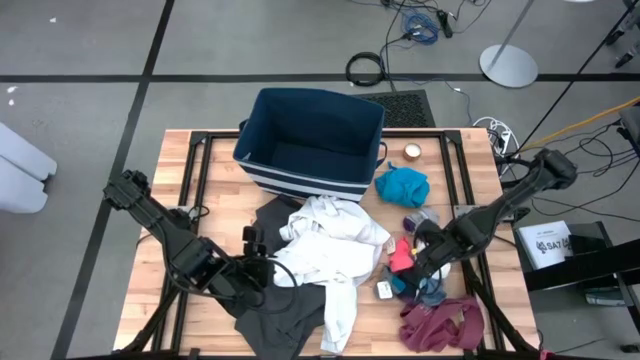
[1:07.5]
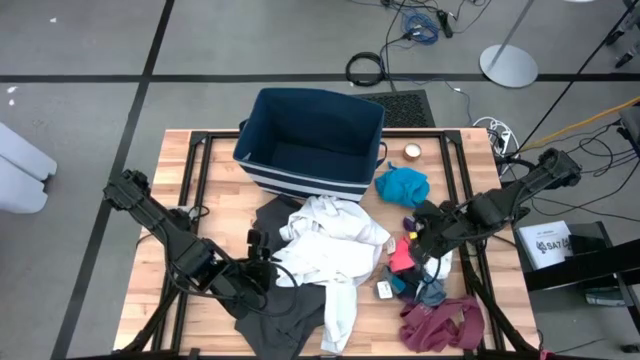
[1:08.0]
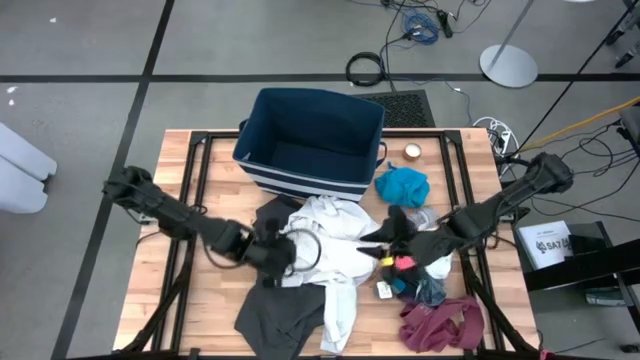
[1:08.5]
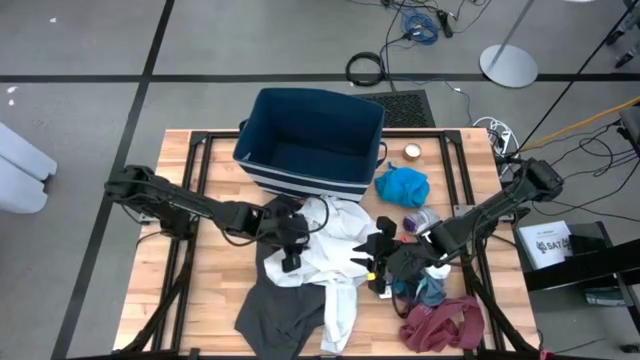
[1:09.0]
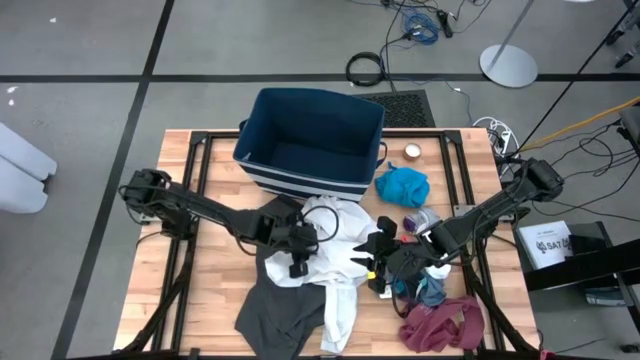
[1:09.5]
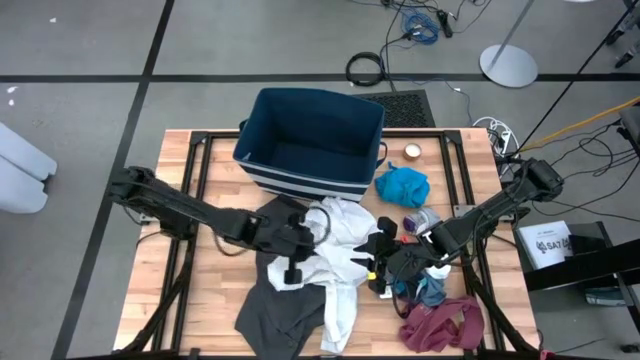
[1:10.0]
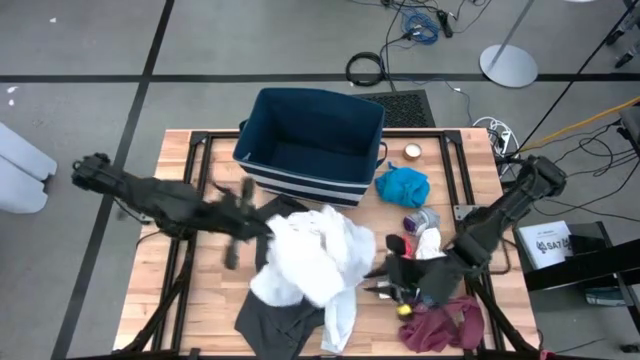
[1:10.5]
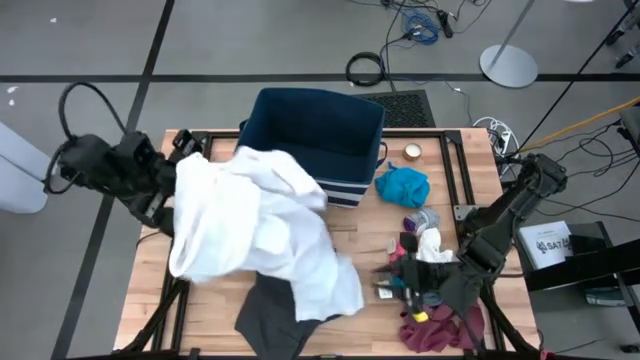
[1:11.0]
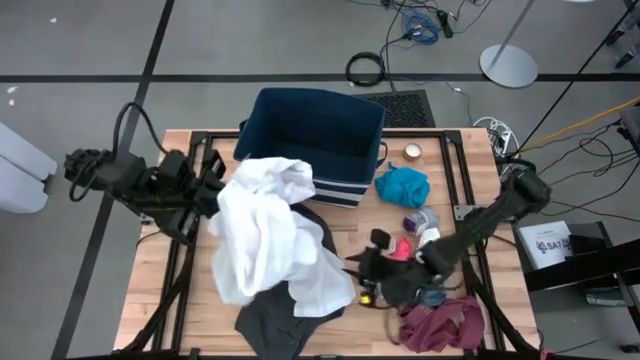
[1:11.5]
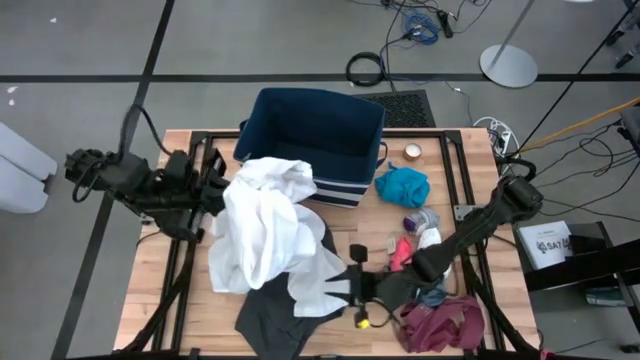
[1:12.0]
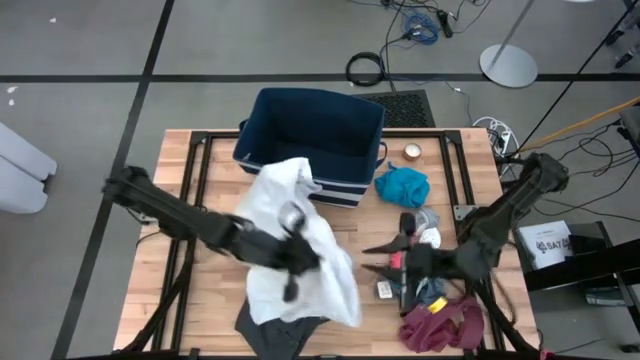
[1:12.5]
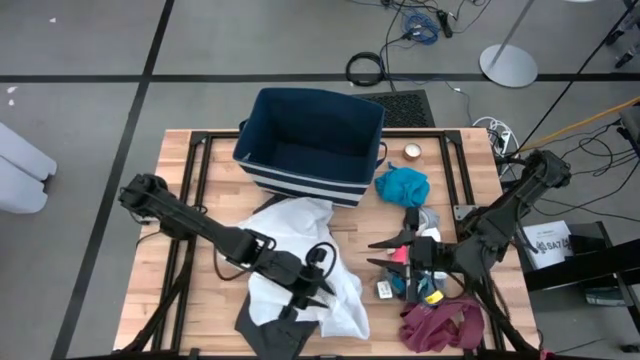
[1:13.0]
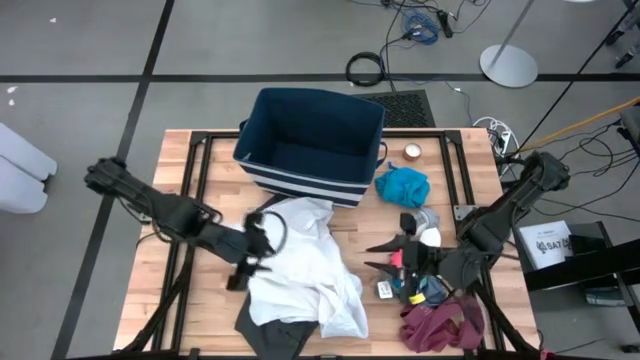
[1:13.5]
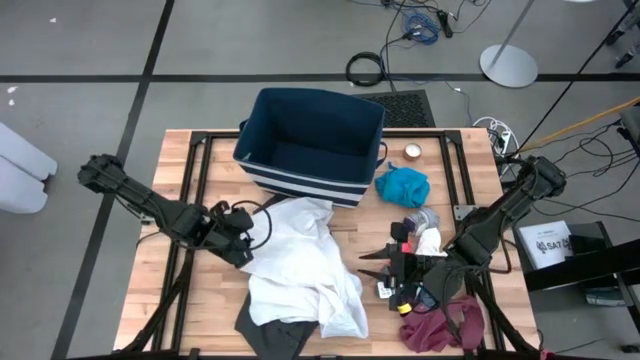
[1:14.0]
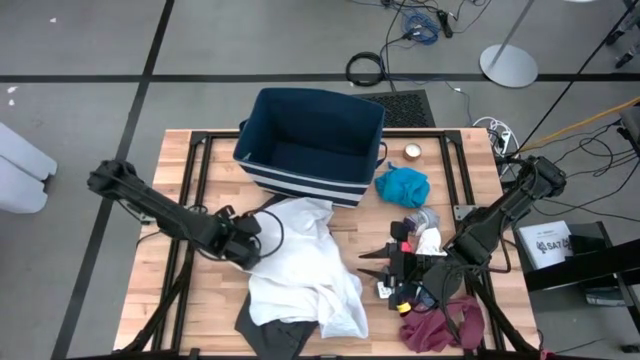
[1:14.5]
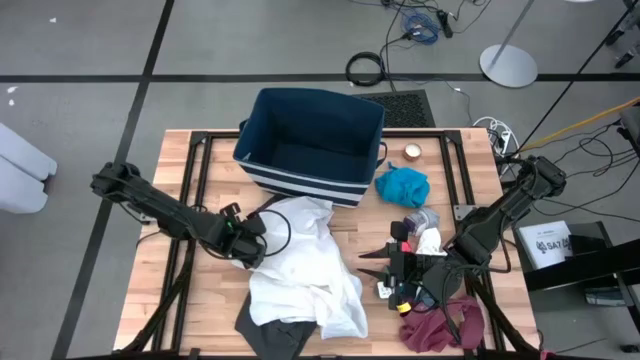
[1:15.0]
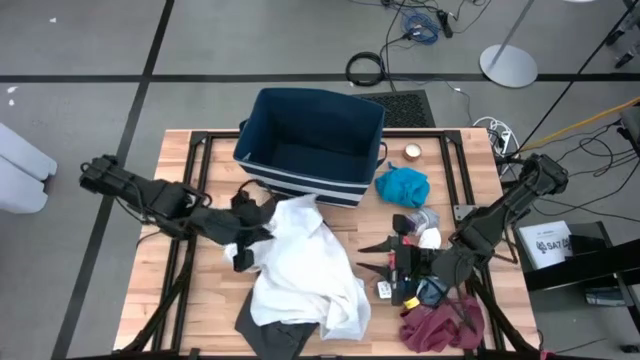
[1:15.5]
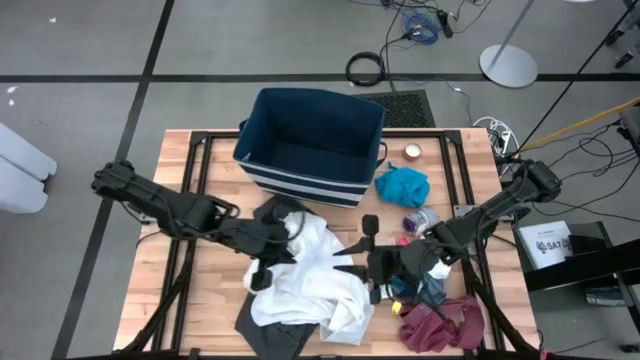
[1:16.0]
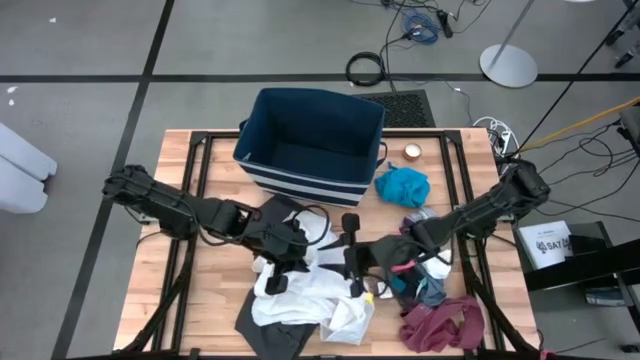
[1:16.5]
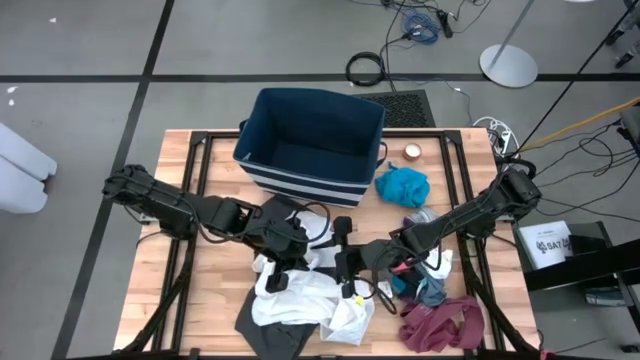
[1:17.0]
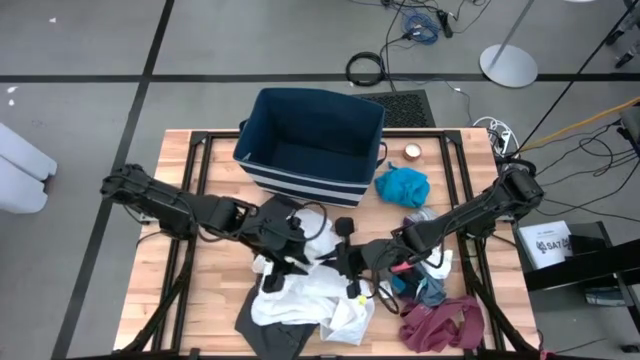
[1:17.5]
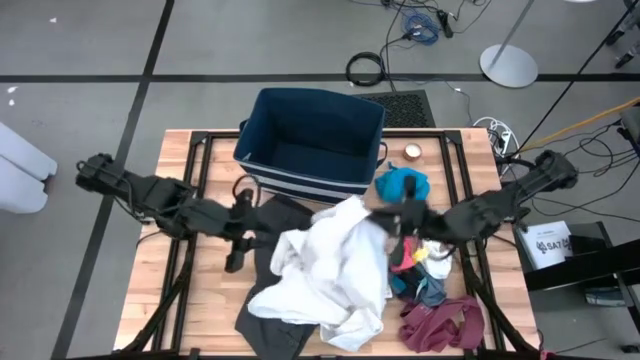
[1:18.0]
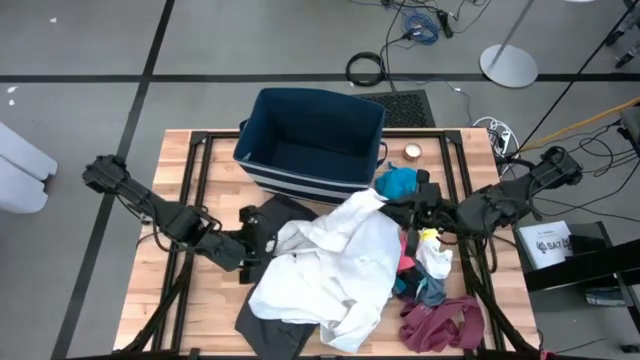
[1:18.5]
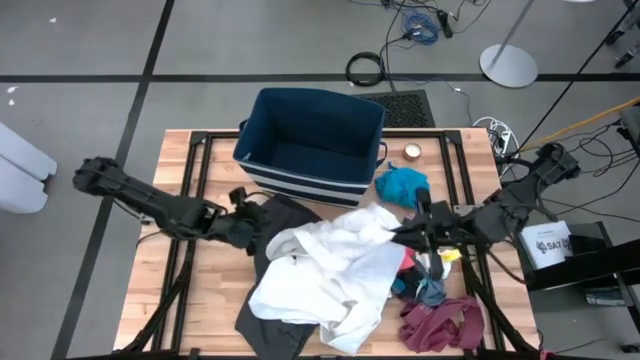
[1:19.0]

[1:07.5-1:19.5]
Task: Sort clothes
Put the white shirt into the blue laundry bin

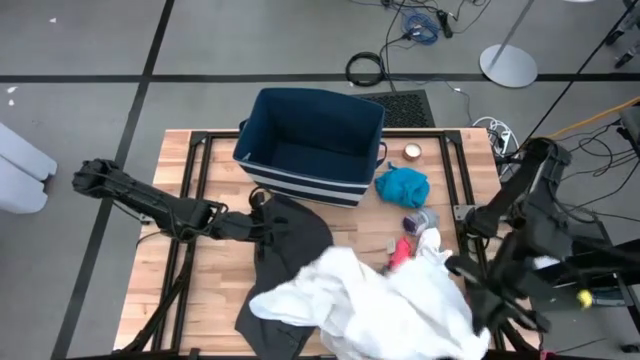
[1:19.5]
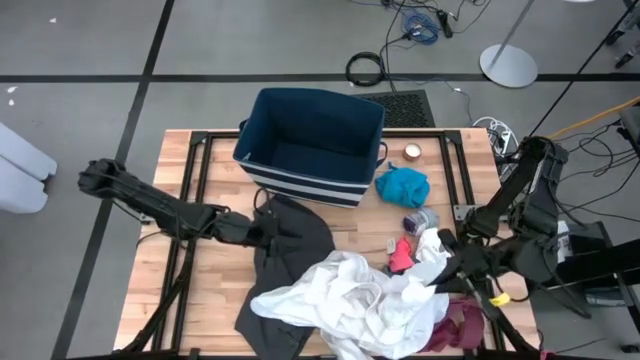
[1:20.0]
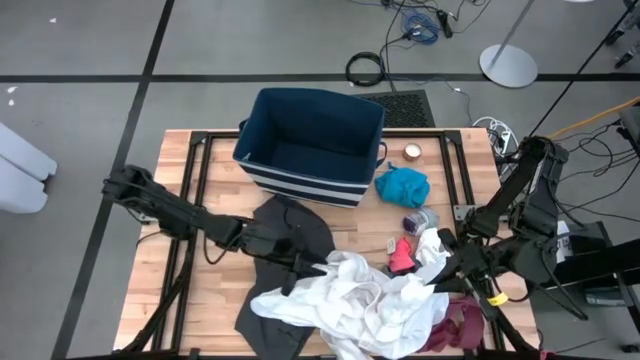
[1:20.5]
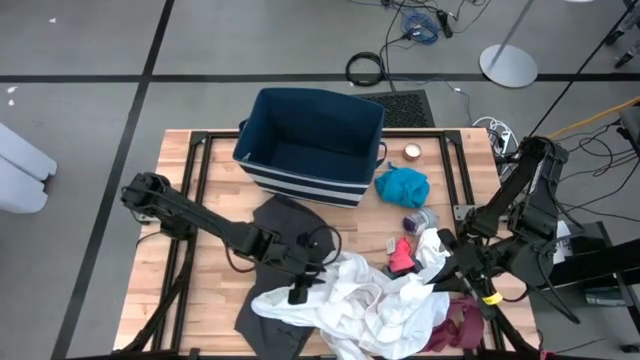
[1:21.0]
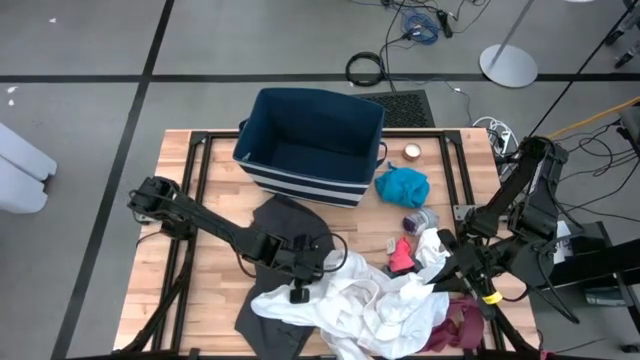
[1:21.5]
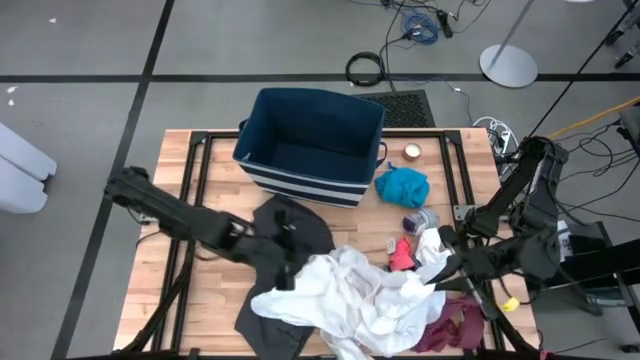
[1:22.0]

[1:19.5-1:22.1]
Put the white shirt into the blue laundry bin

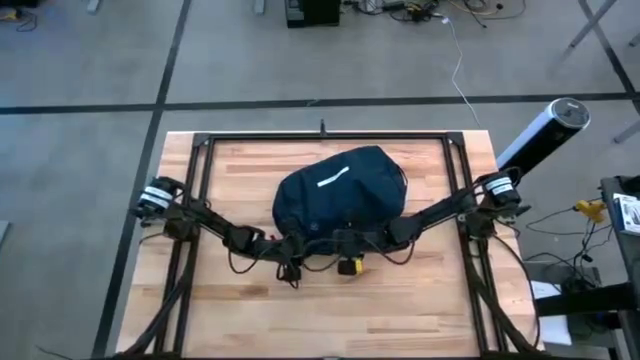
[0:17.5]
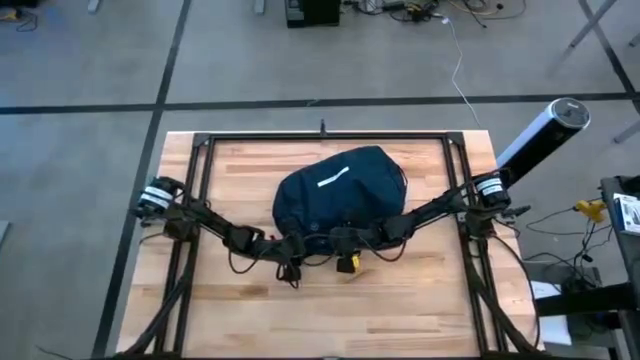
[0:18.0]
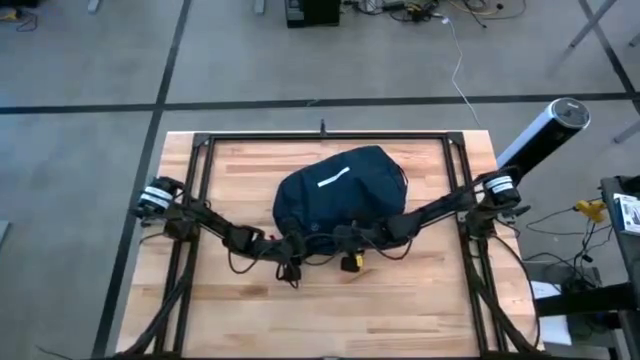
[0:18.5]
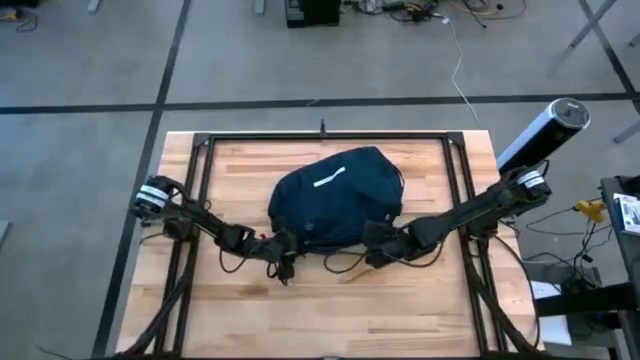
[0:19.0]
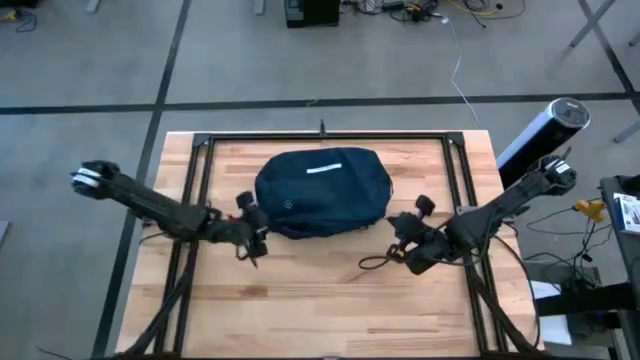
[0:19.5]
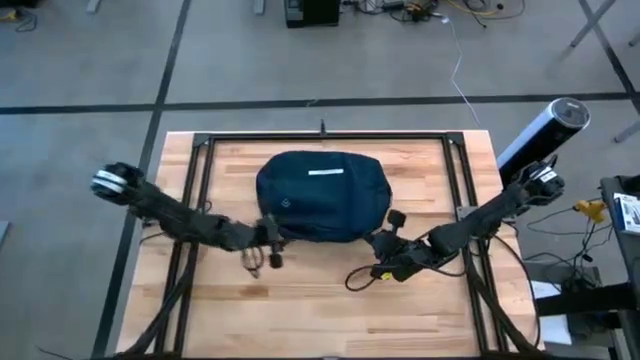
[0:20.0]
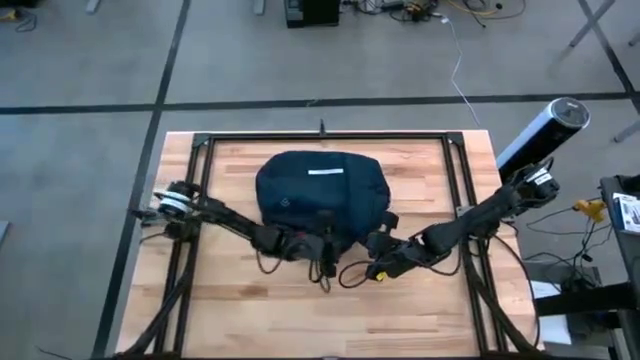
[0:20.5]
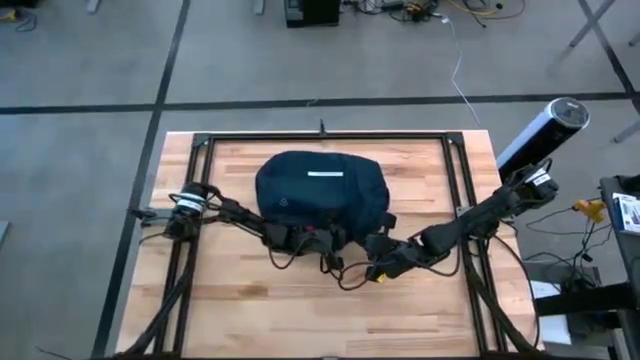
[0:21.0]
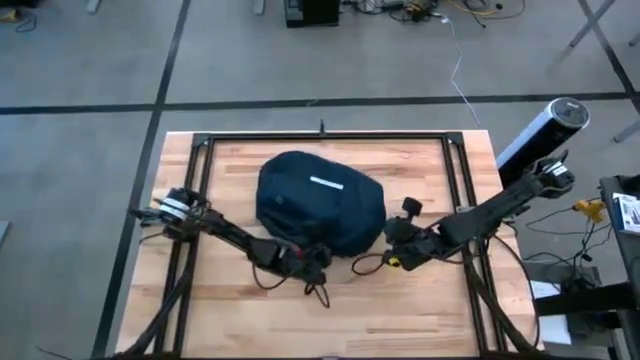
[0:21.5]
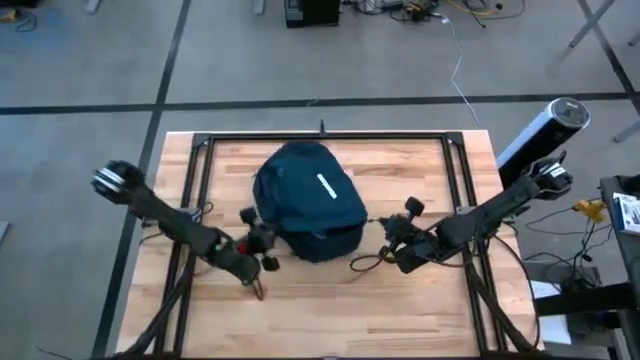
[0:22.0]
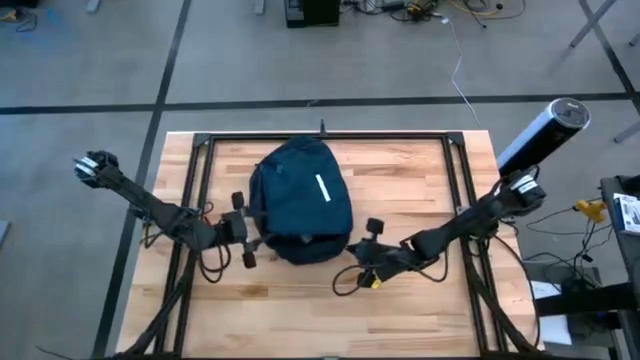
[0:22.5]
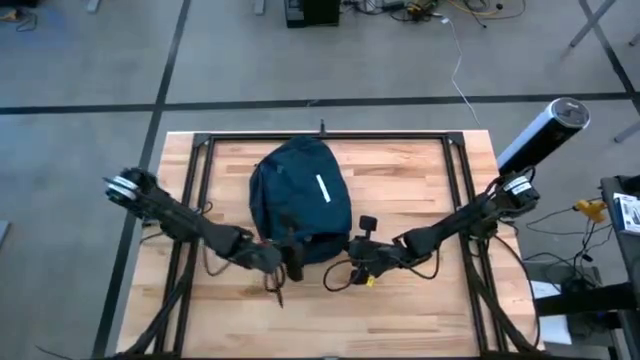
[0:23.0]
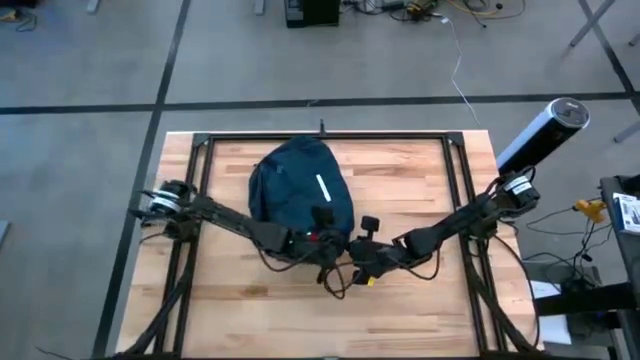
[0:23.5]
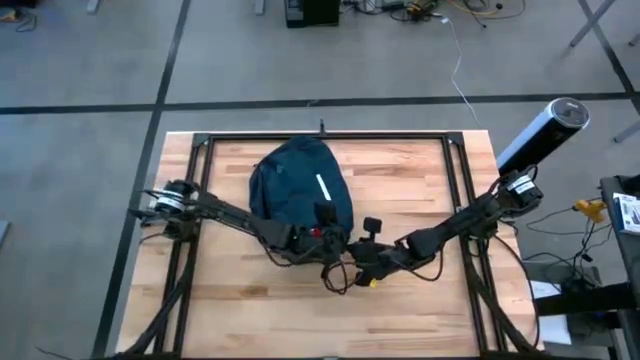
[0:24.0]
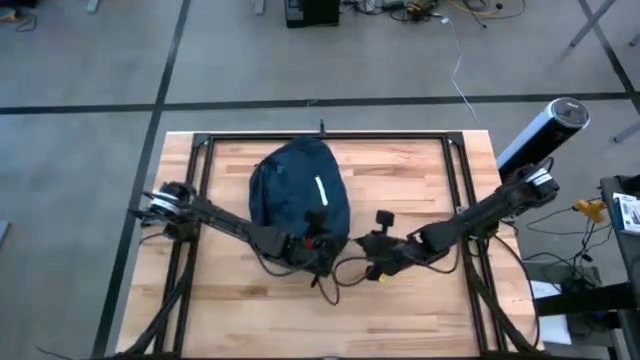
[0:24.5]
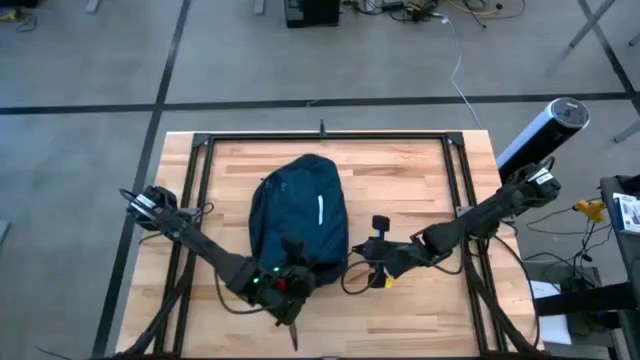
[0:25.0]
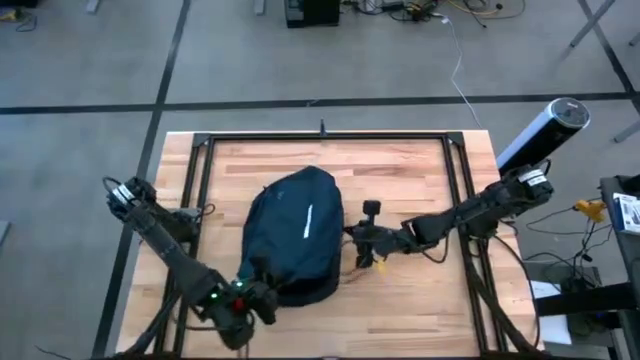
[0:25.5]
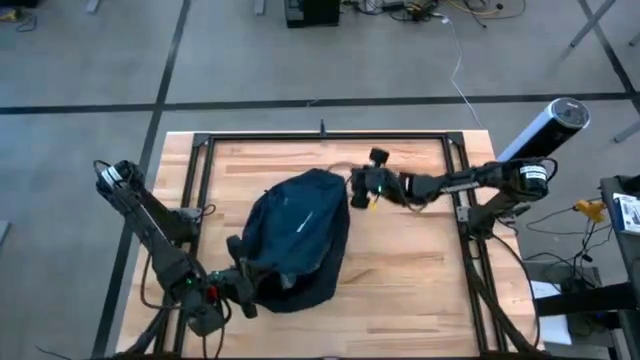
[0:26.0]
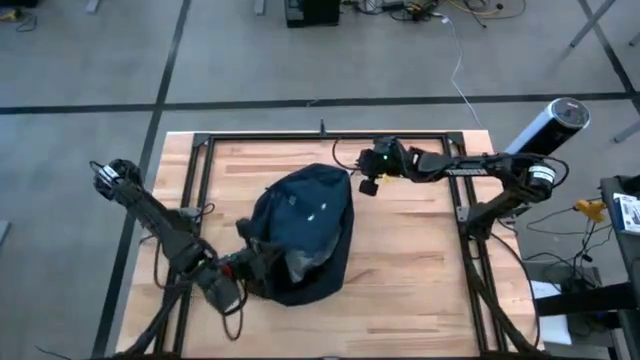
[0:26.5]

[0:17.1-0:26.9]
Task: Unpack backpack
Open the blue backpack
